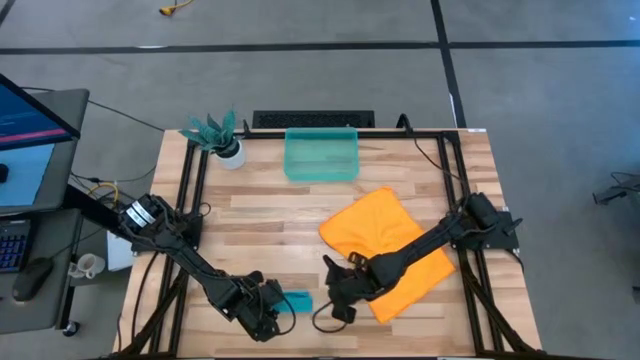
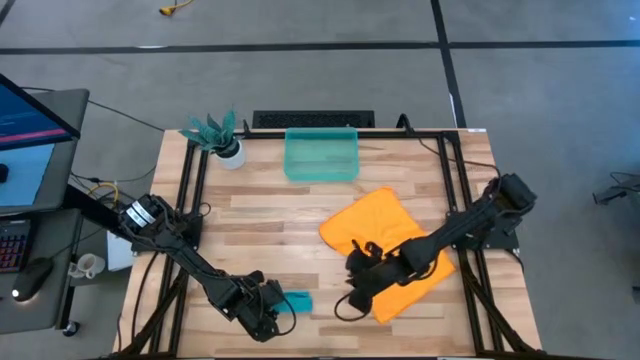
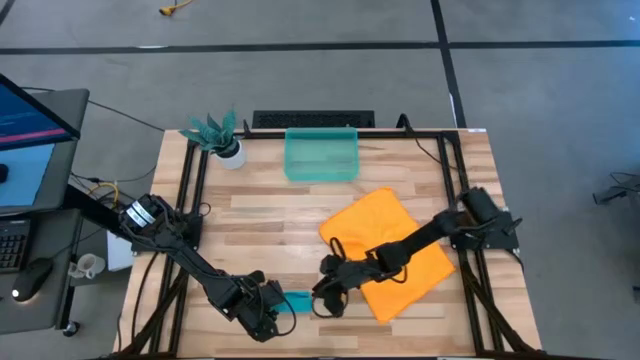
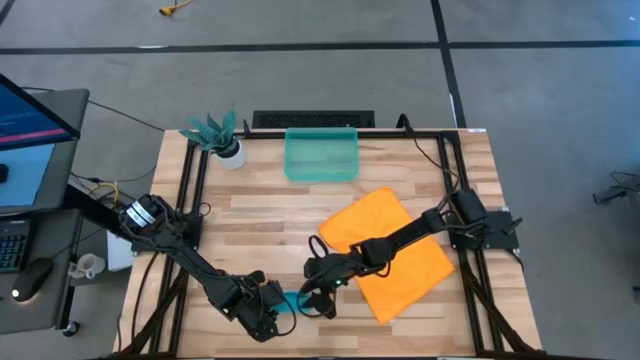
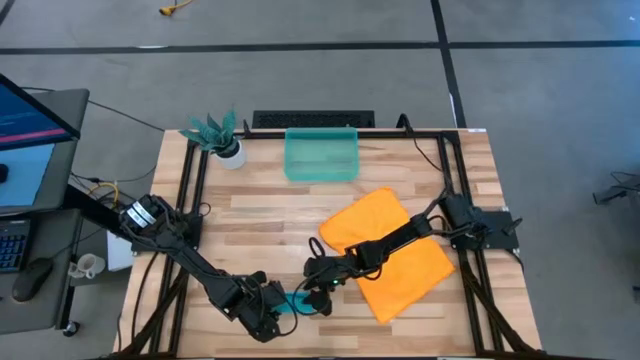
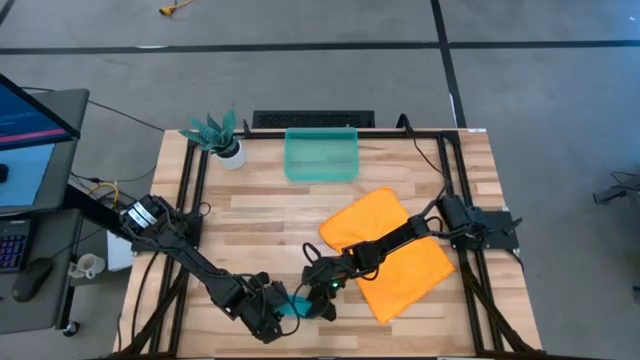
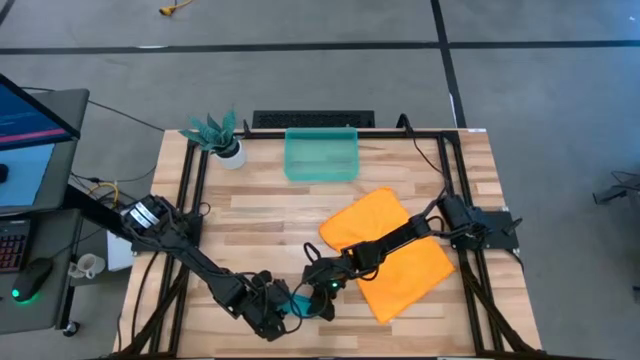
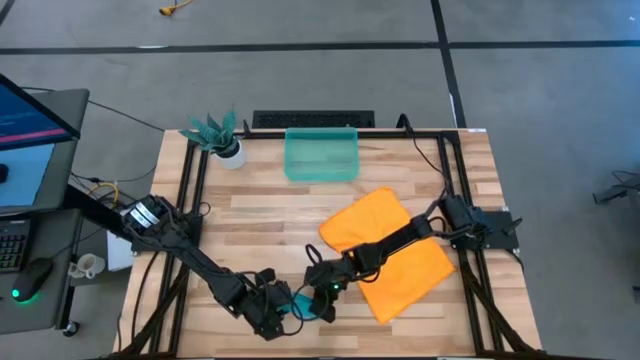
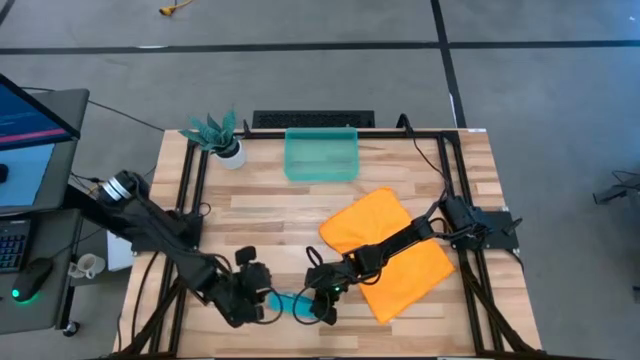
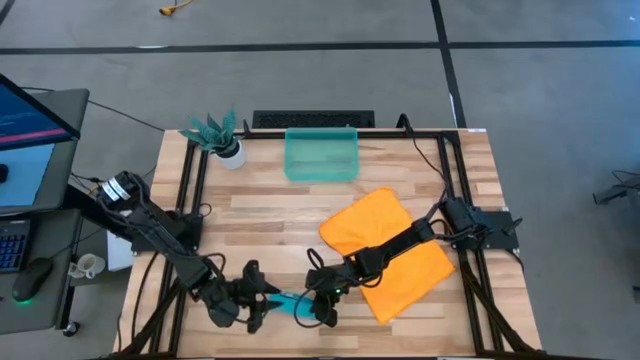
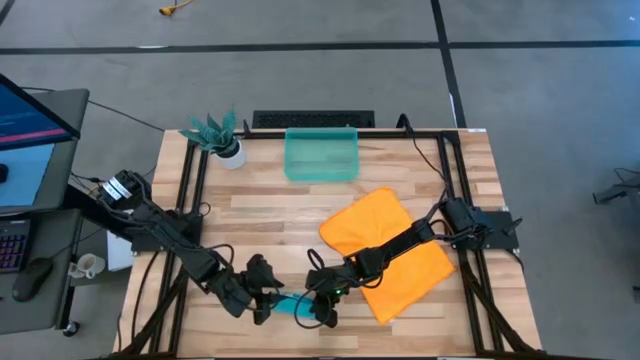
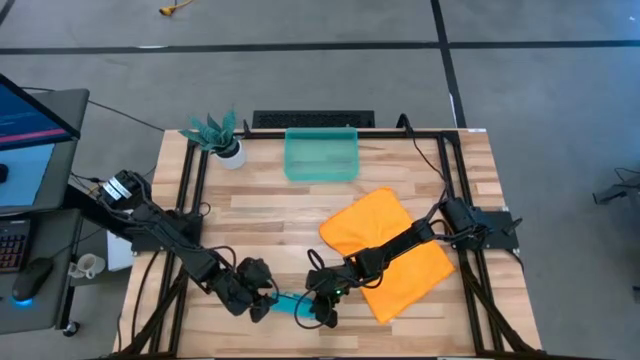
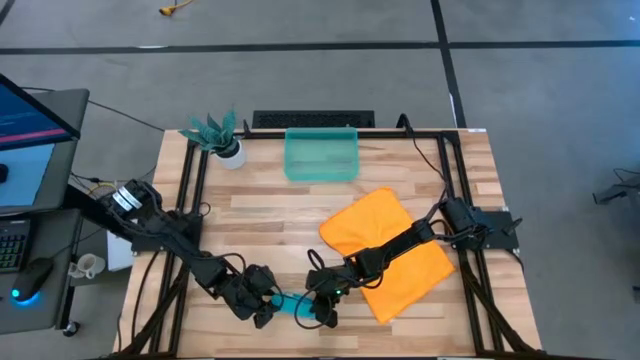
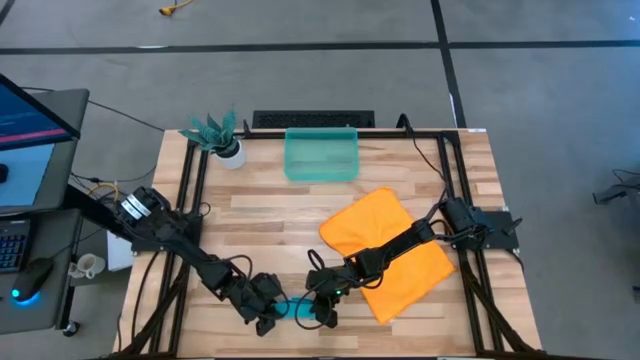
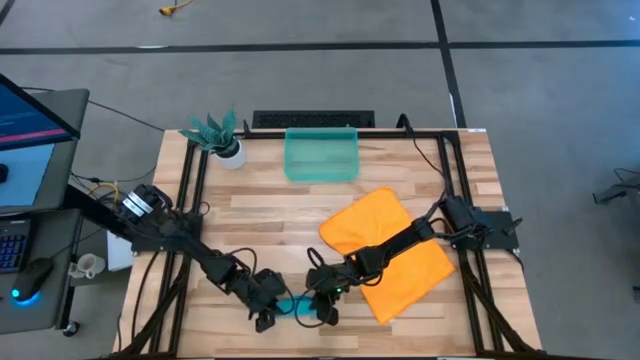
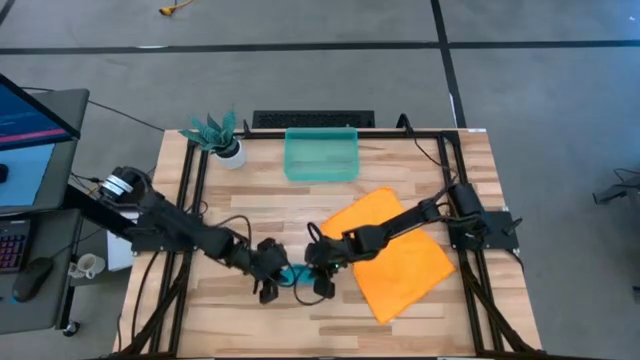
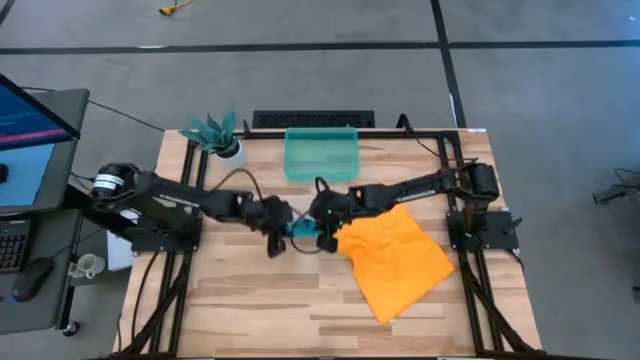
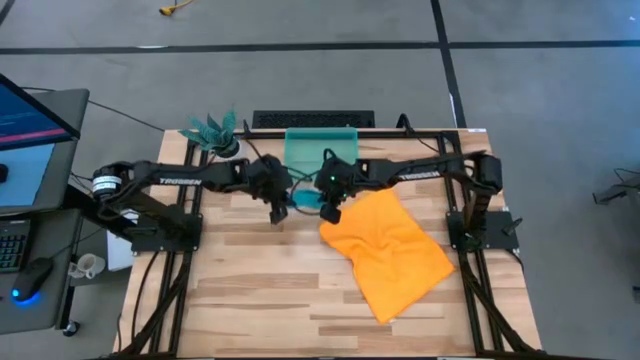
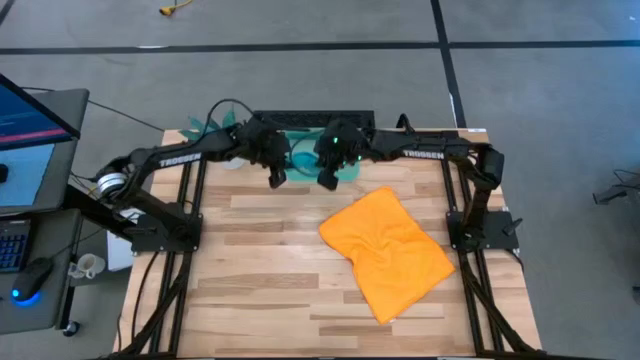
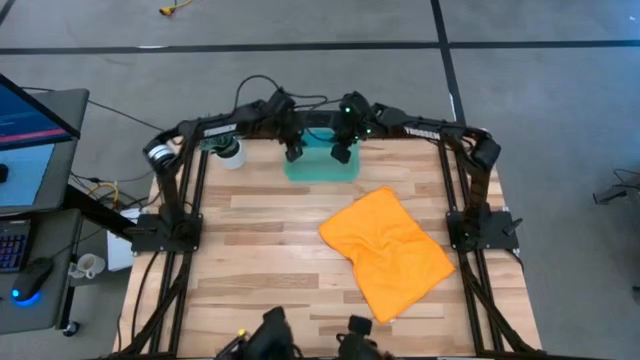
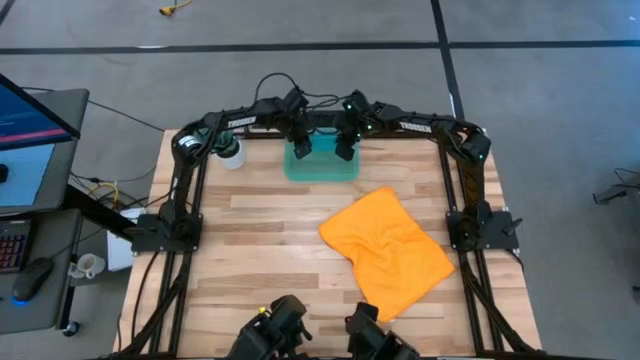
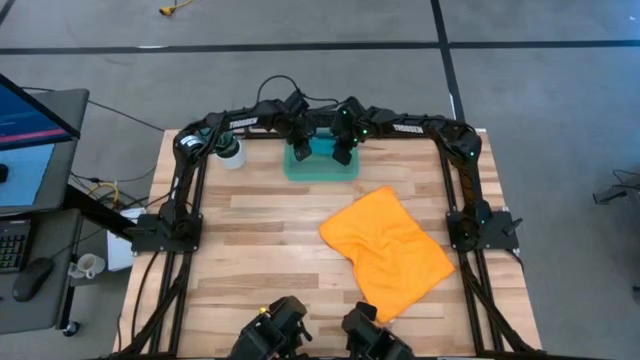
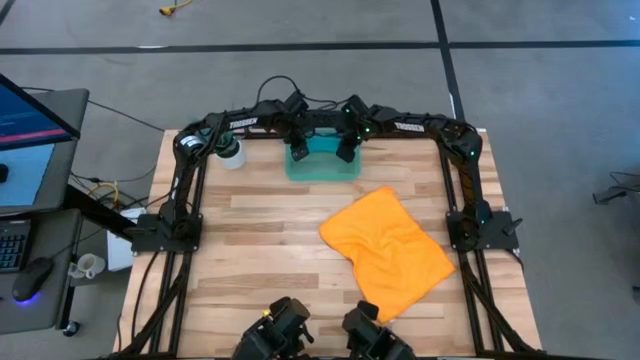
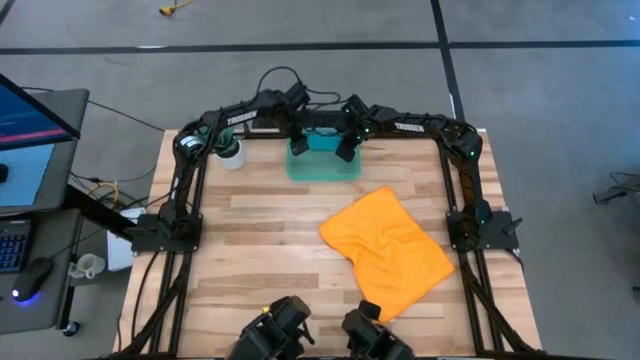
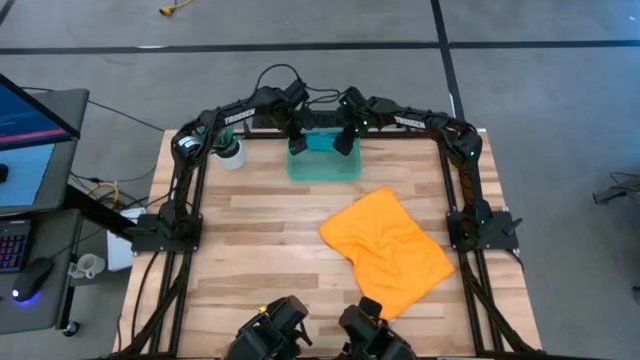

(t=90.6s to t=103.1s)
Task: Roll microfiber towels into tight, uniform cylinder then place into a basket
Put the blue microfiber cloth into the green bin

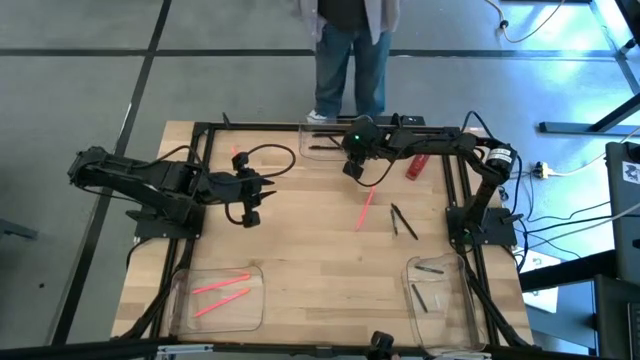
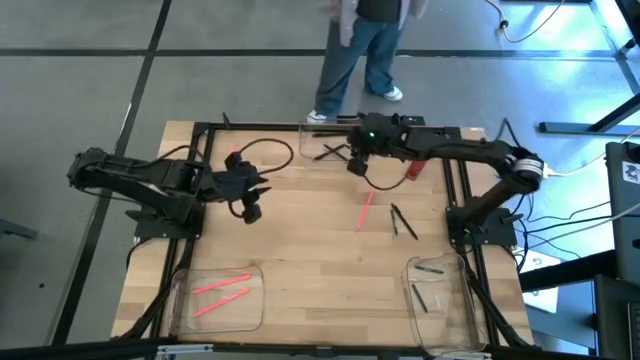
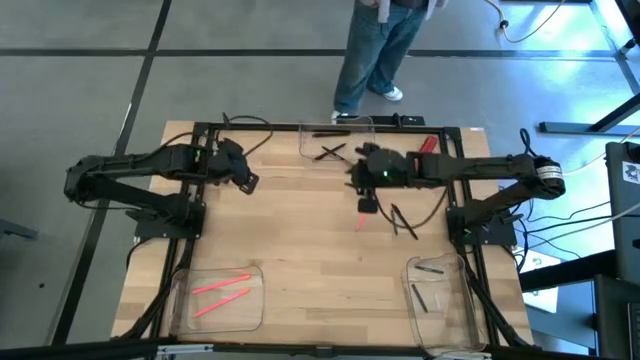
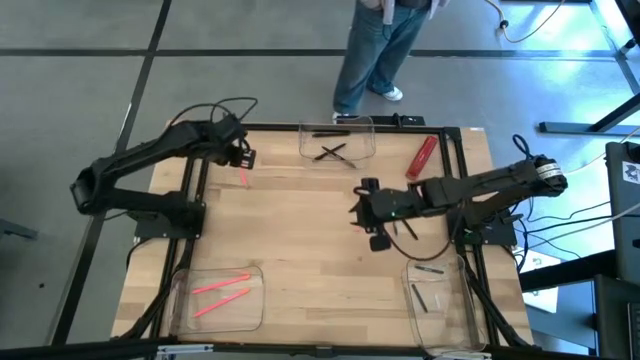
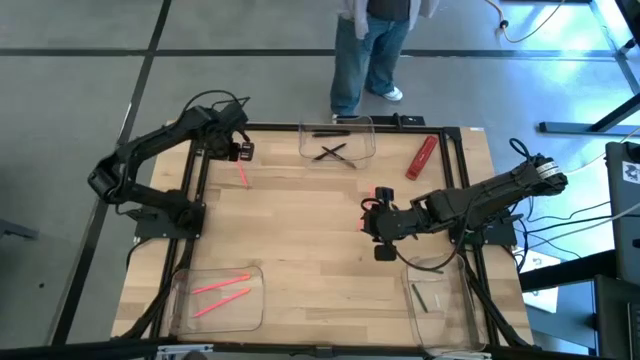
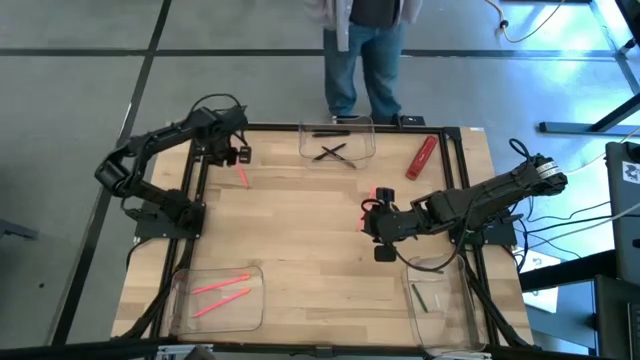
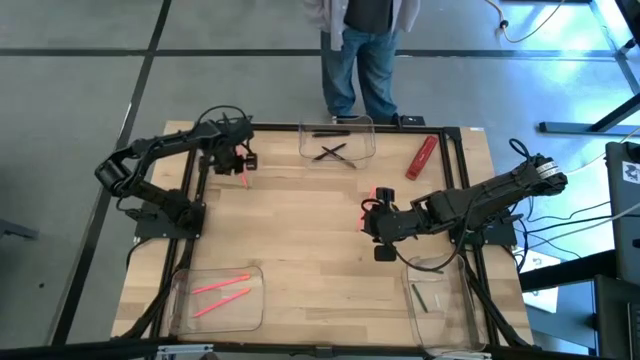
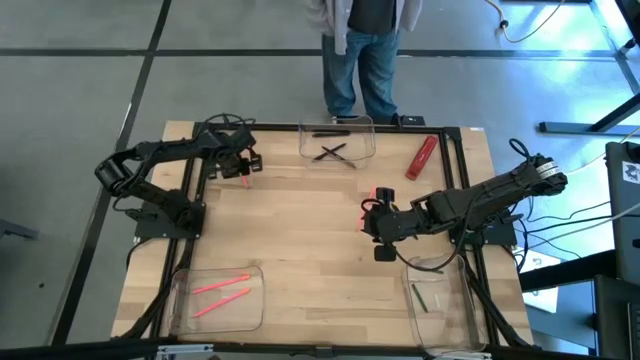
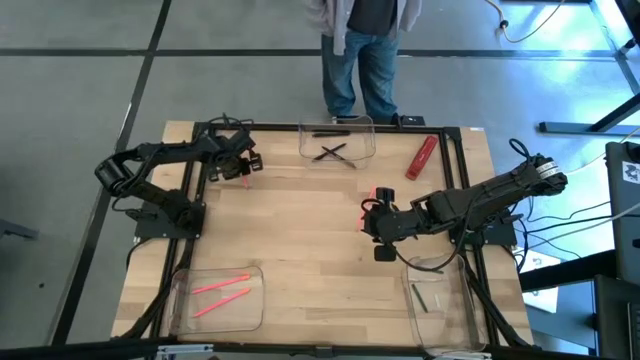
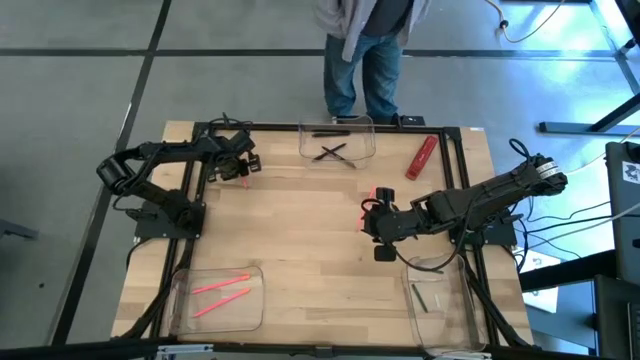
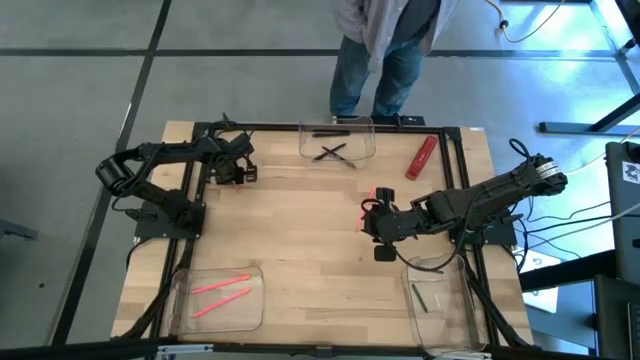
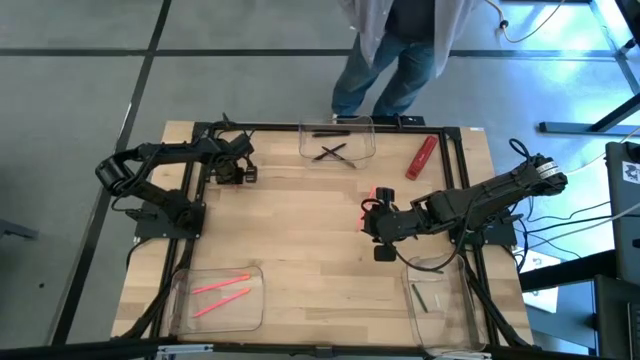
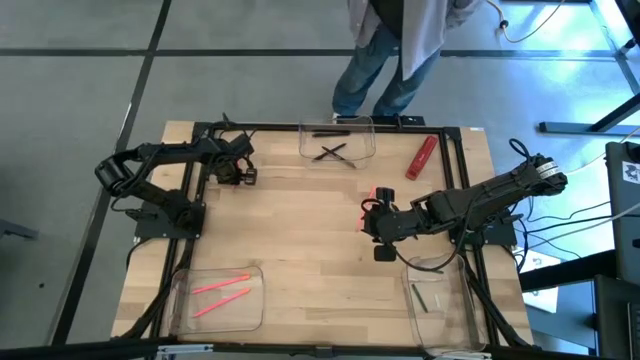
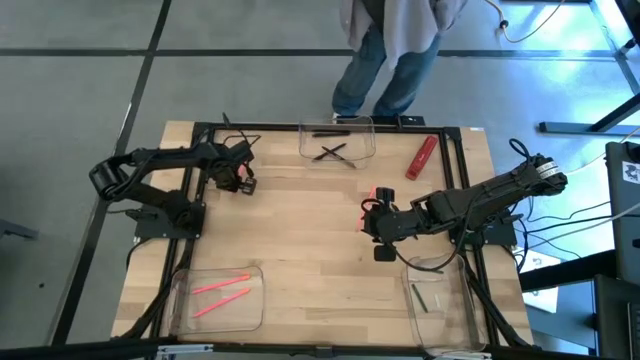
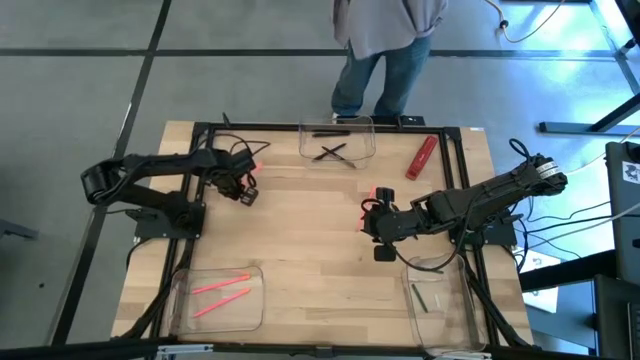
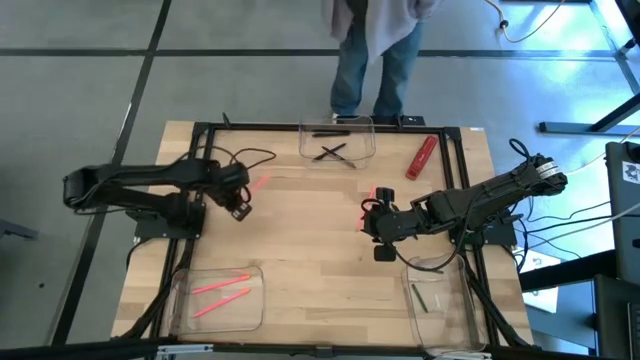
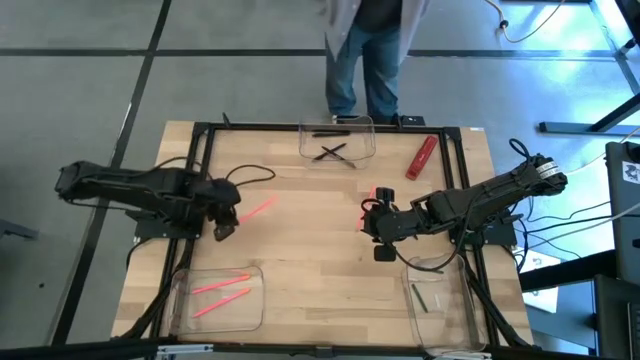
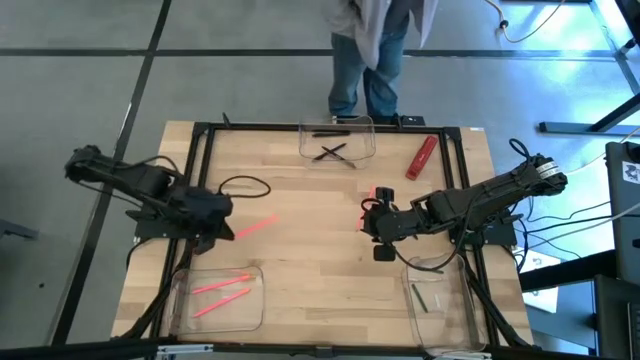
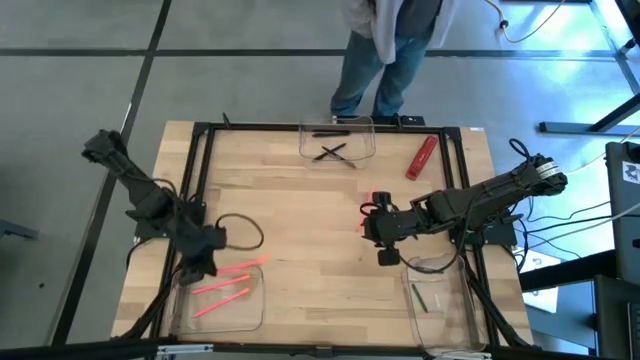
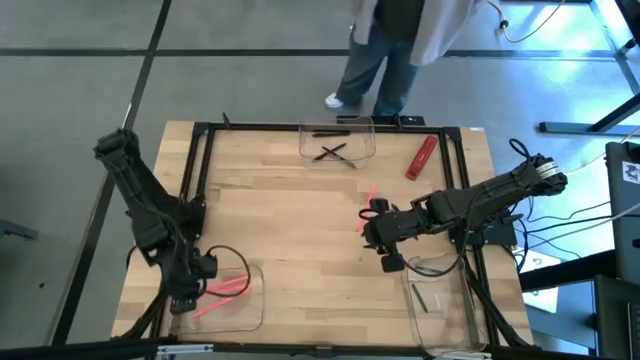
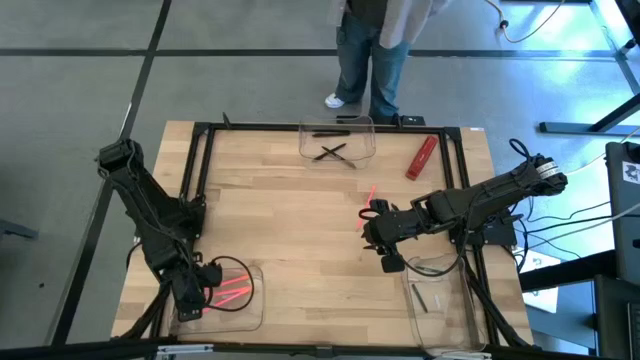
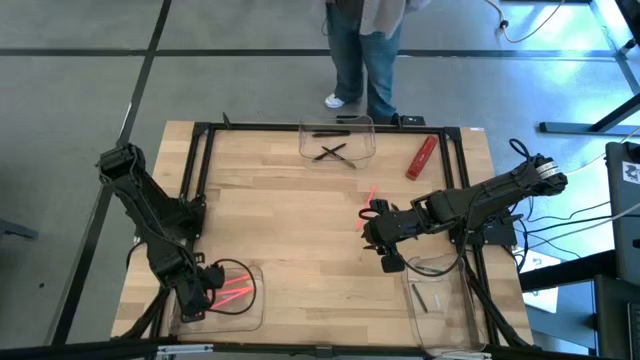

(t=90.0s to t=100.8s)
Task: Sort crayons/erasers/pens/pencils in bins
Put the pink colored pencil into the bottom left transparent bin
